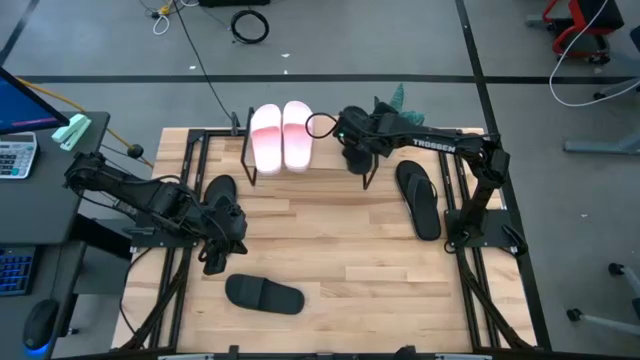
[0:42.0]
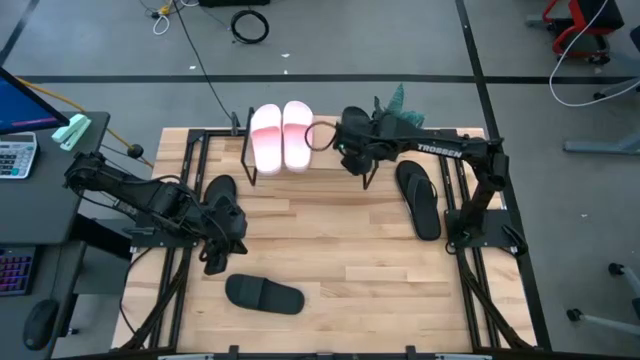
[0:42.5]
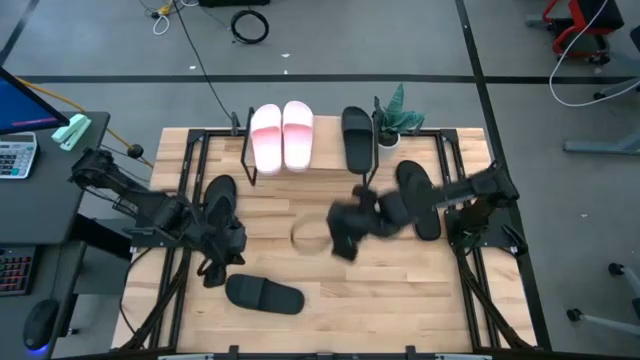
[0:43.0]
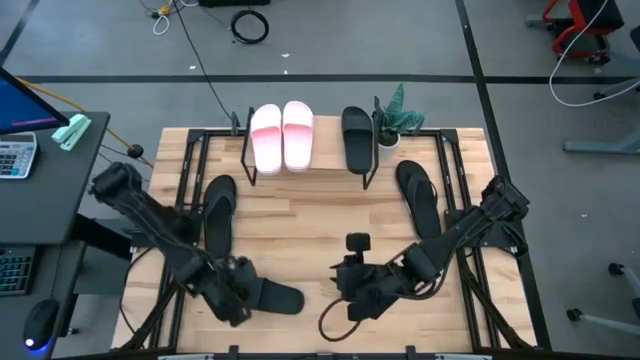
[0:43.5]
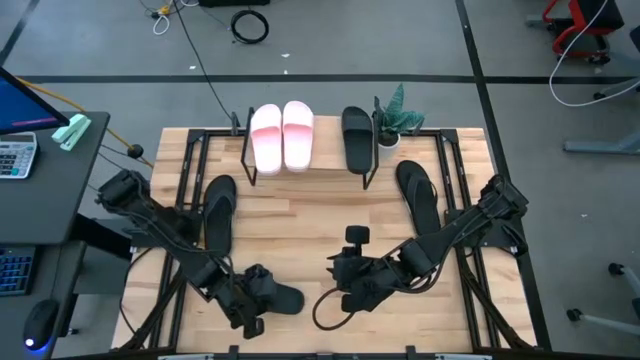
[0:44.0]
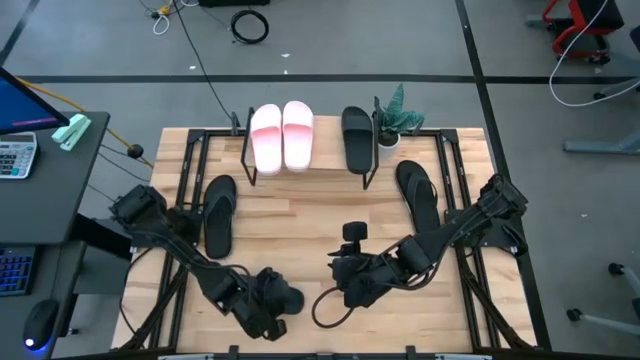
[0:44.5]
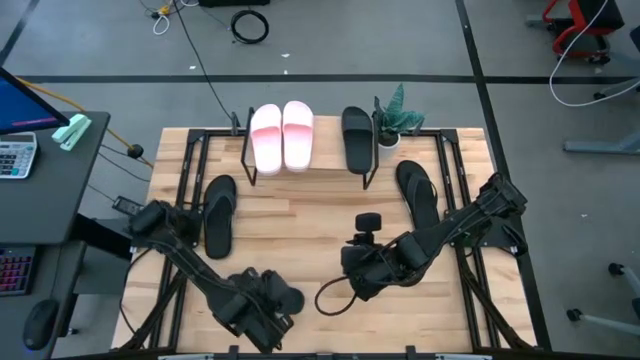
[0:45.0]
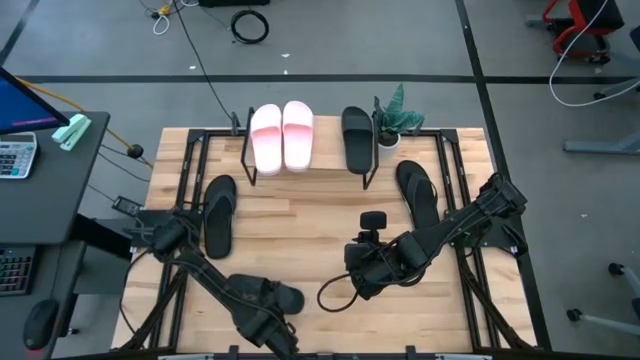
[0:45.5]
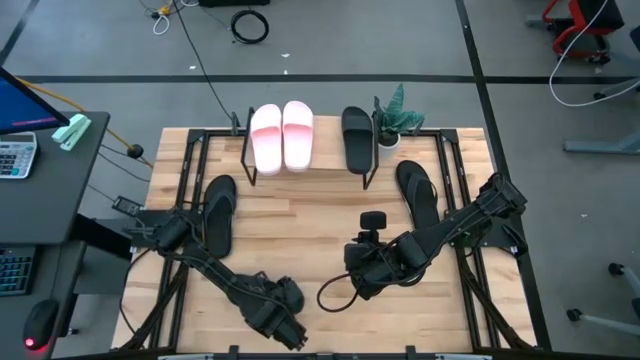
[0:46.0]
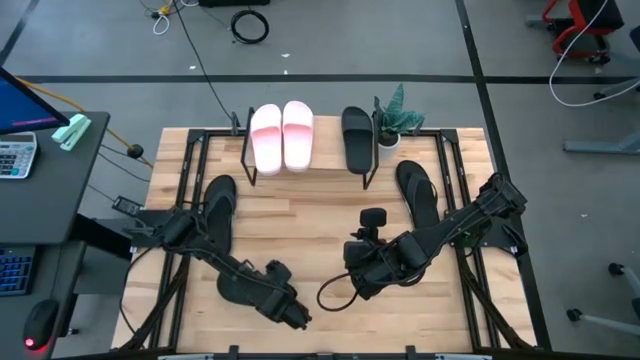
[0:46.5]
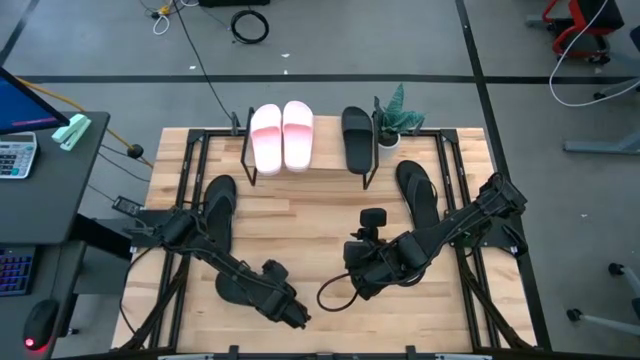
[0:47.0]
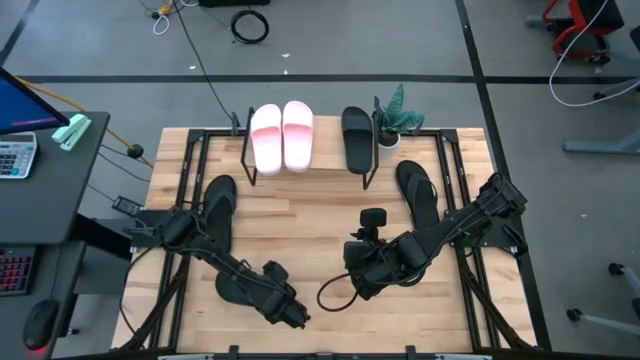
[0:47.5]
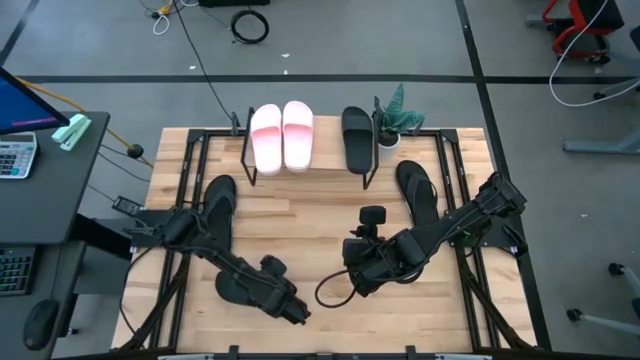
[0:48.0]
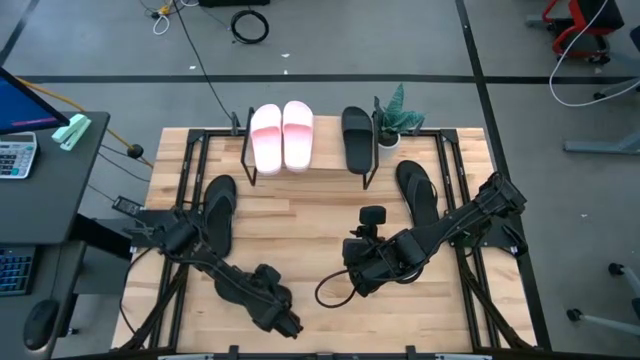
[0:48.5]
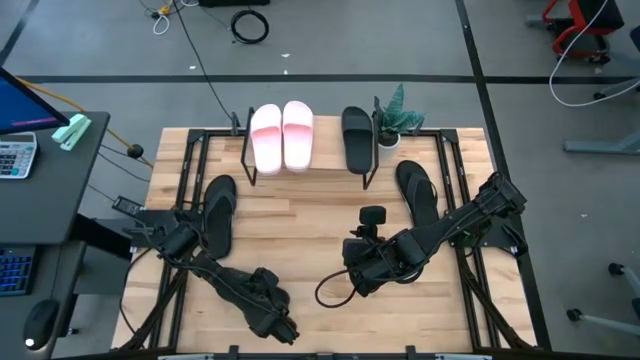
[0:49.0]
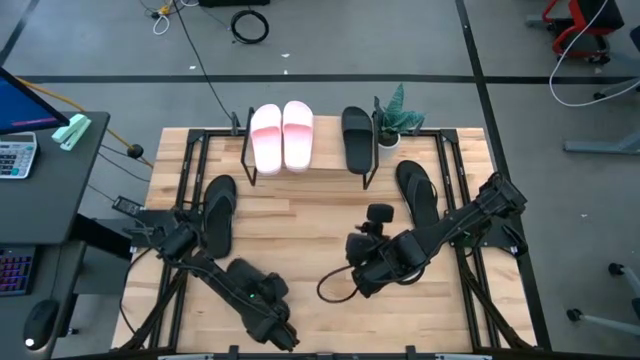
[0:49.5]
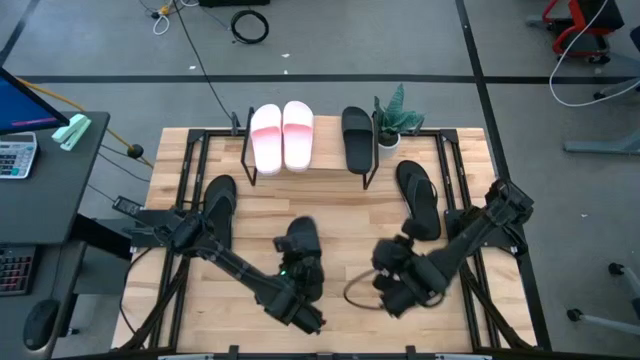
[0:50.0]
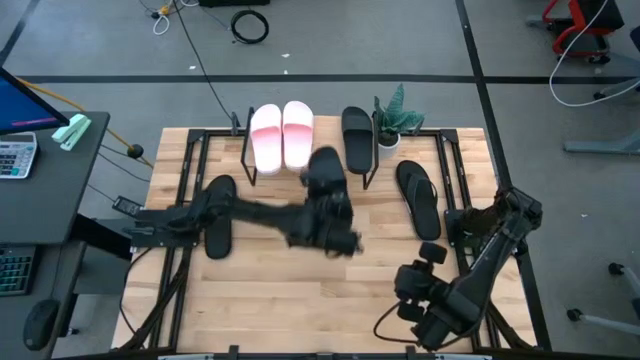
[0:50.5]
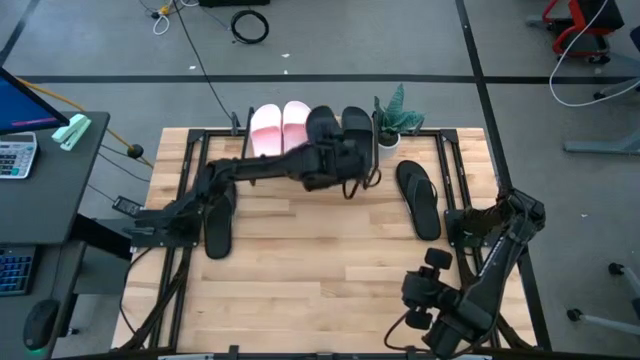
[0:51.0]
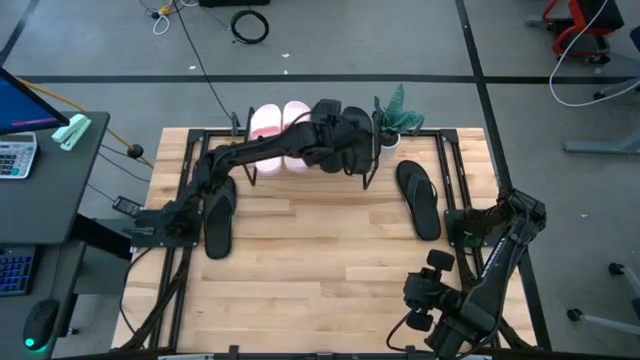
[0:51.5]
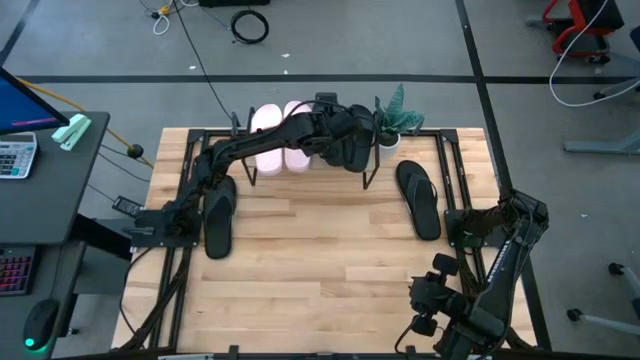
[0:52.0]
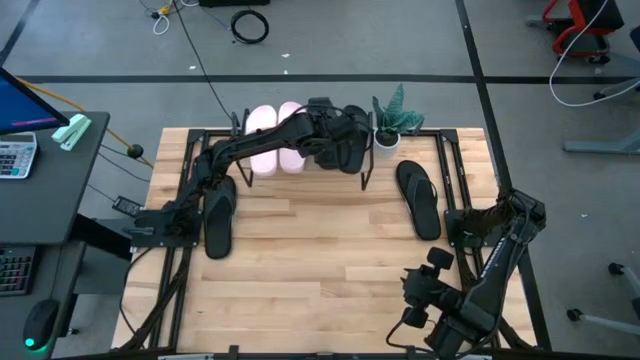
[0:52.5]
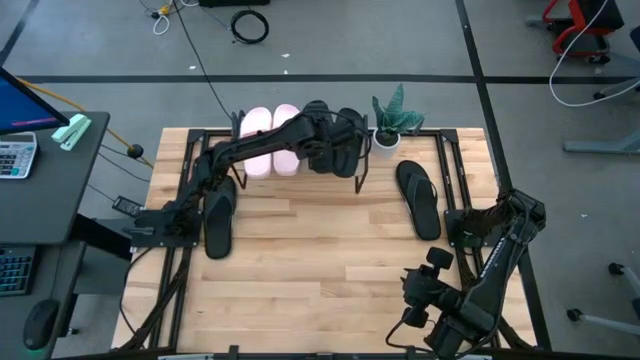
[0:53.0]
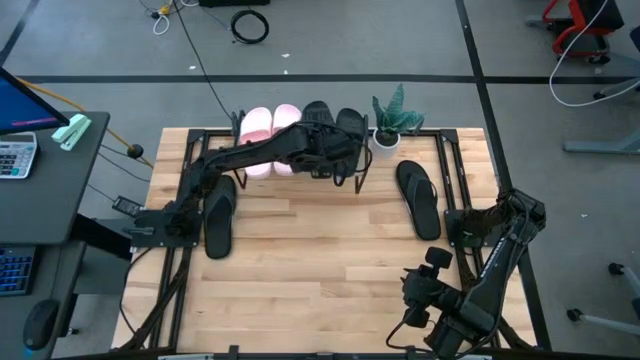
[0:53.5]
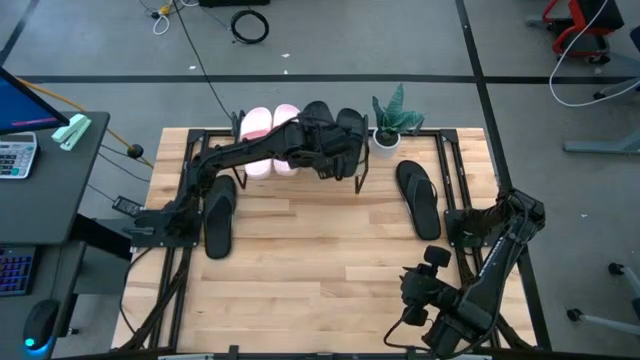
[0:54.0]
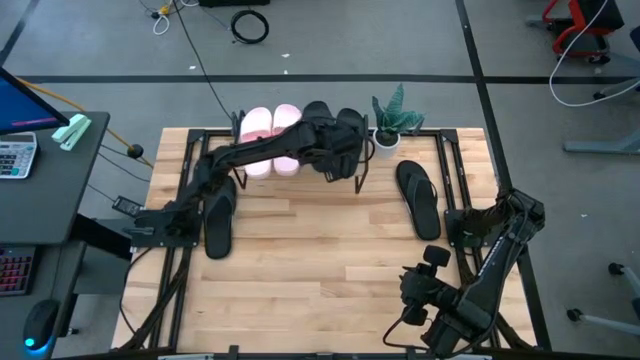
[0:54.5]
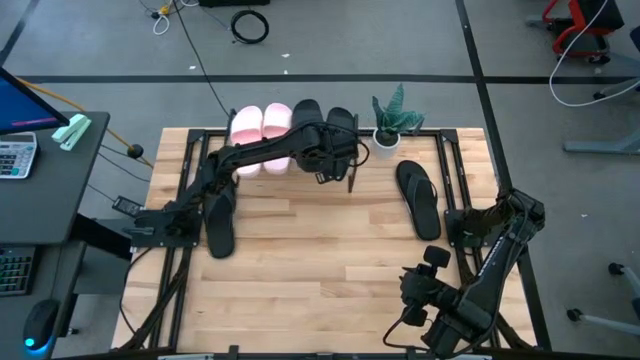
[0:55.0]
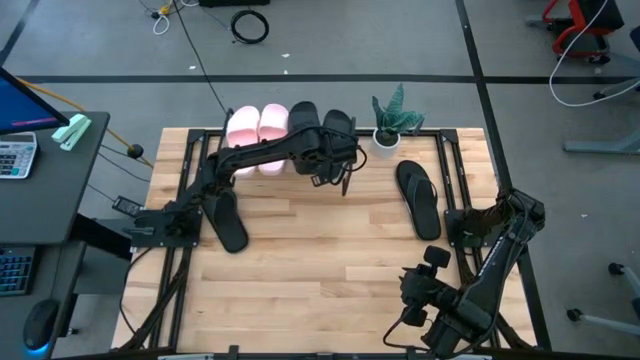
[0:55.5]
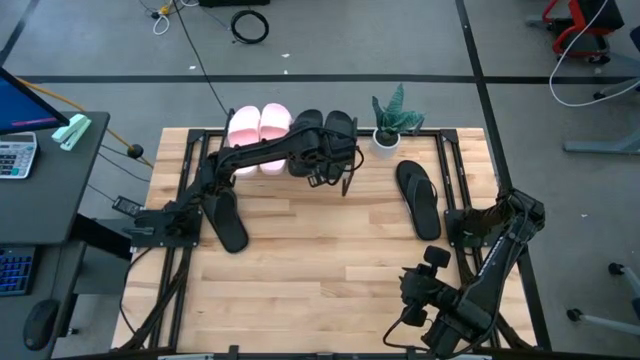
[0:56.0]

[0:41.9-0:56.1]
Task: Pick and place slides into the shelf
Put the black slipper on the shelf

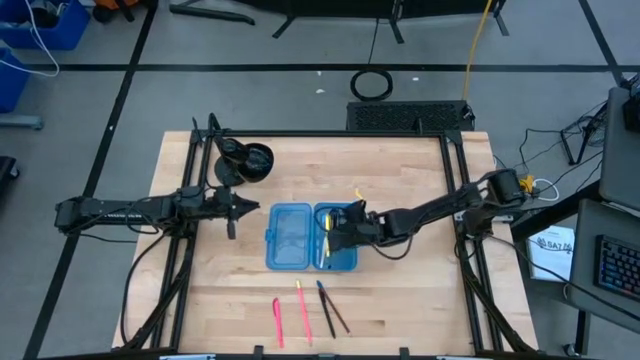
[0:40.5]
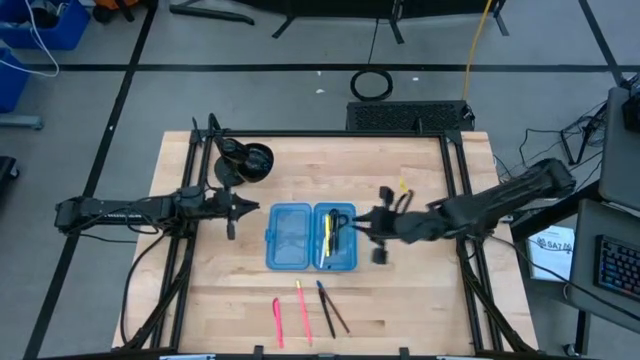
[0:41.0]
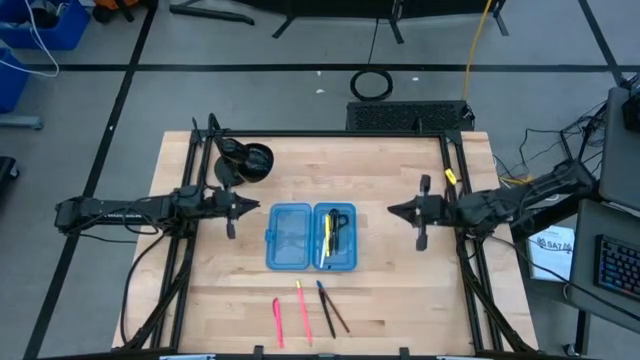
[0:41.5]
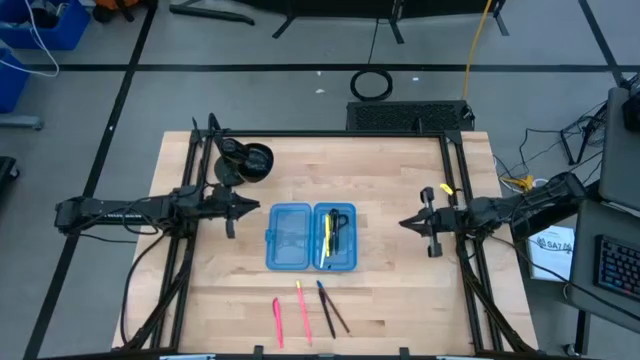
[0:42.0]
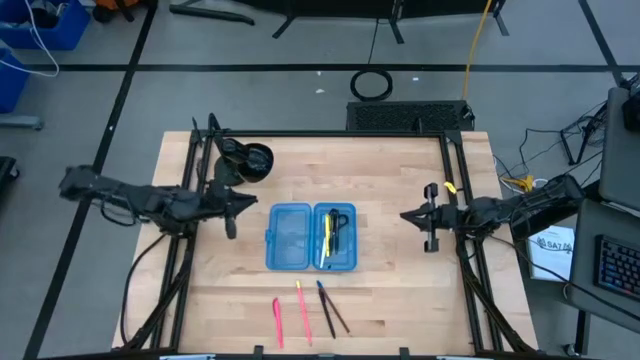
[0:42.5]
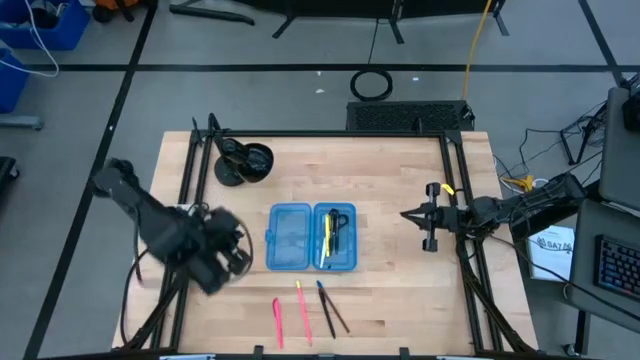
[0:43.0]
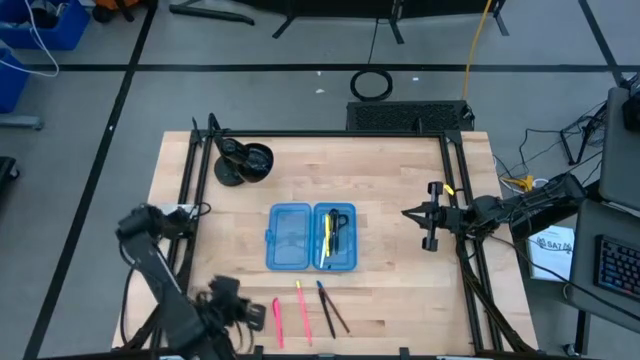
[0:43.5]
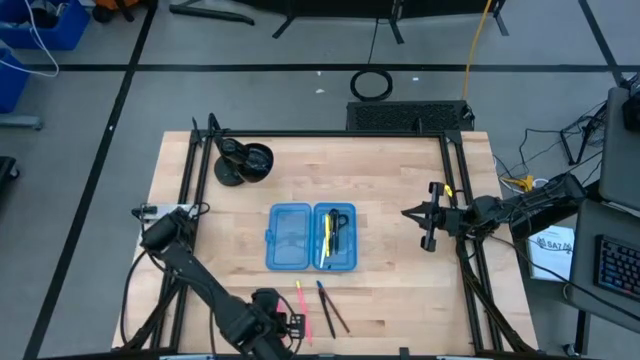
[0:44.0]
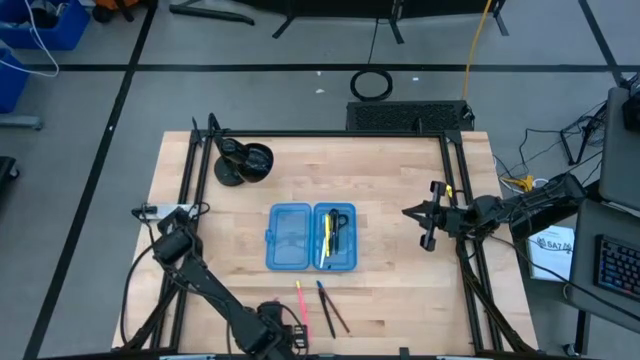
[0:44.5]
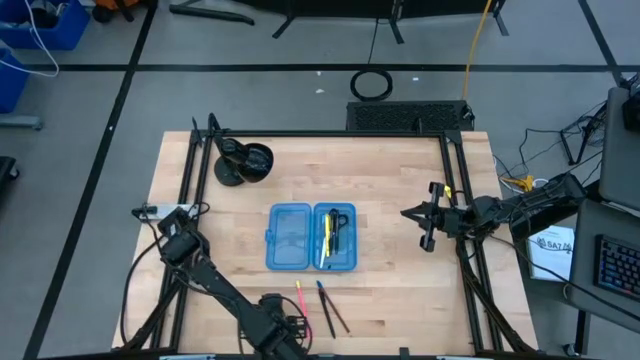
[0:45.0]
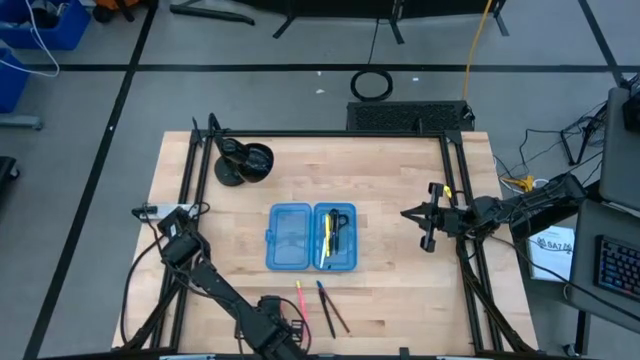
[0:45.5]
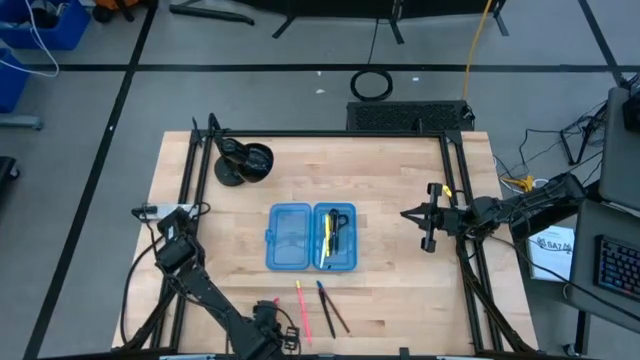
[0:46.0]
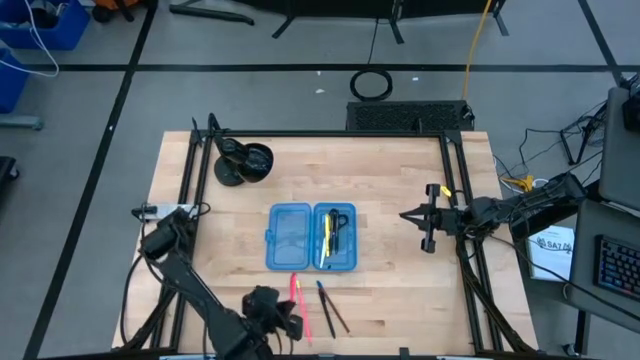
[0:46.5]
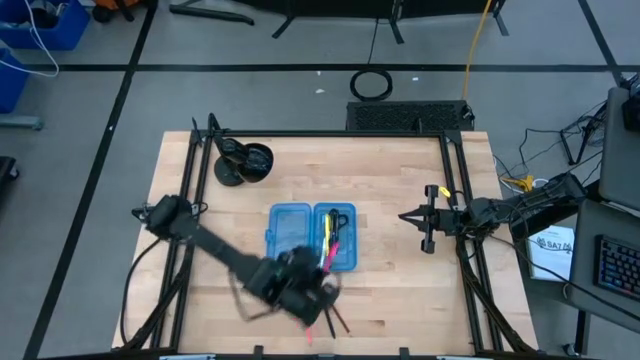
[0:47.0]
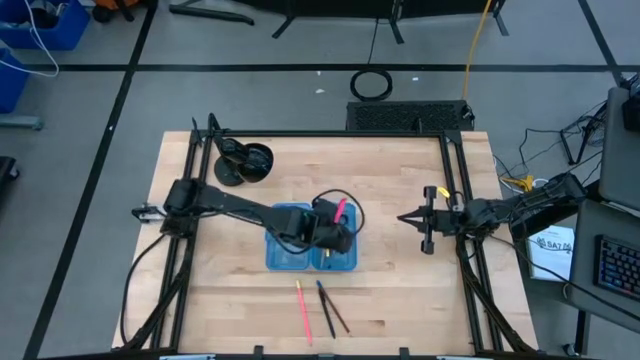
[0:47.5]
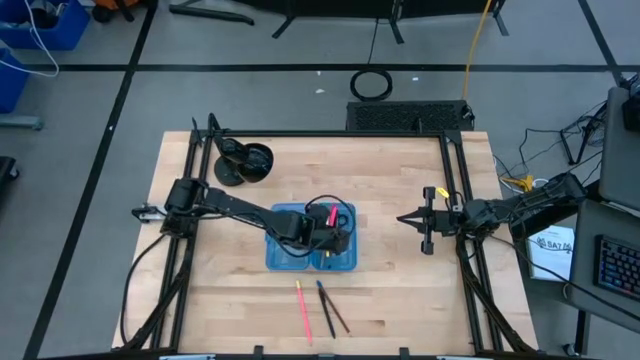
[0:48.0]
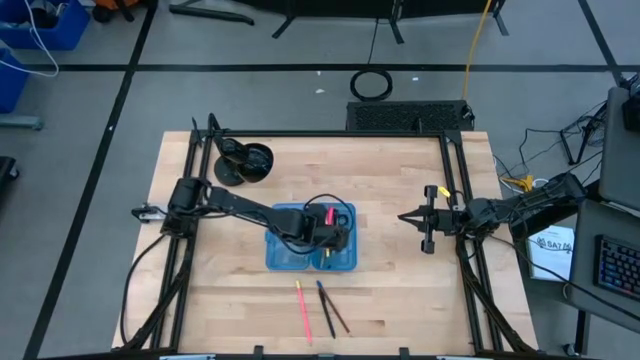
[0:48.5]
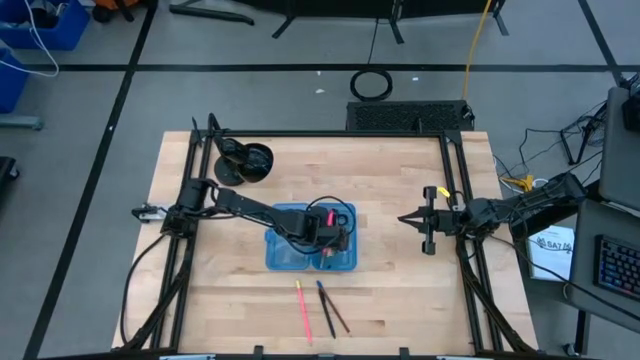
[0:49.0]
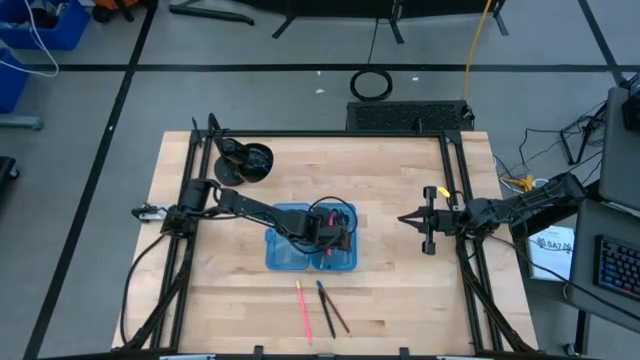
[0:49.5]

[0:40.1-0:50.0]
Task: Pick & place school supplies into a supply box
Put the pink pen into the blue supply box
